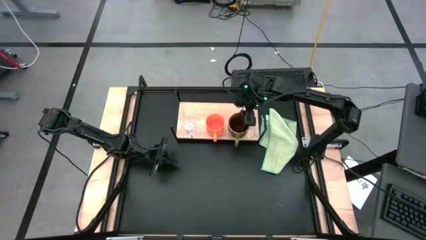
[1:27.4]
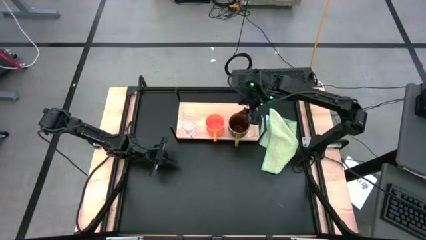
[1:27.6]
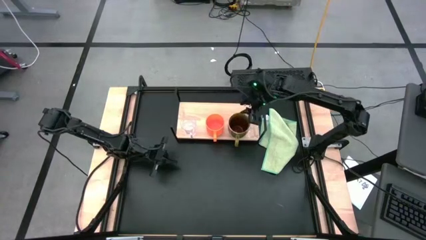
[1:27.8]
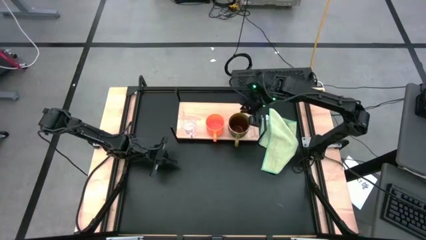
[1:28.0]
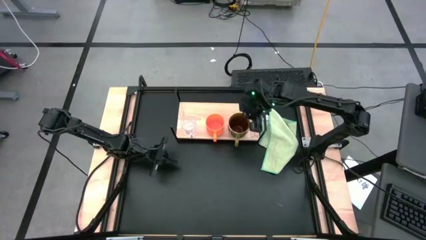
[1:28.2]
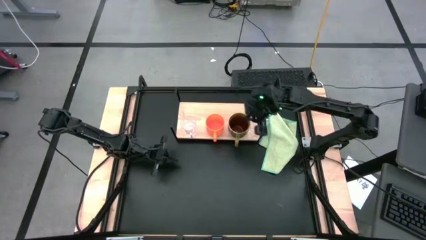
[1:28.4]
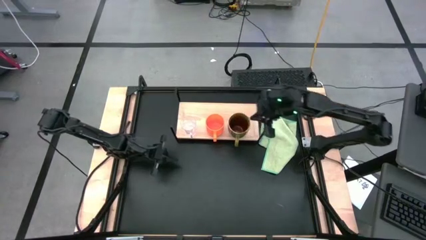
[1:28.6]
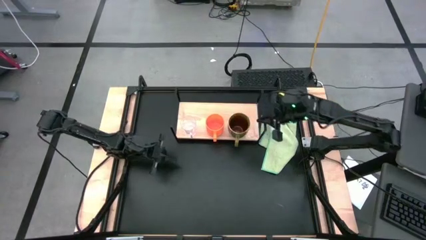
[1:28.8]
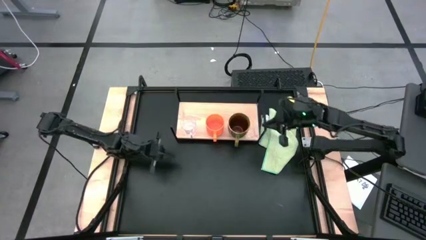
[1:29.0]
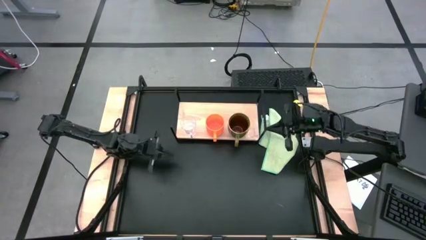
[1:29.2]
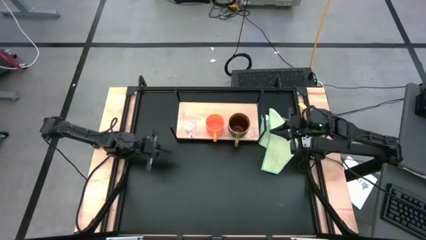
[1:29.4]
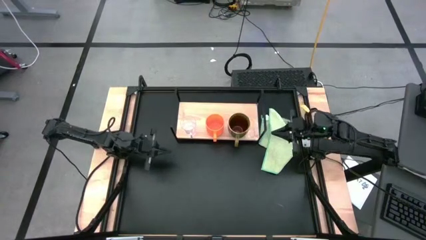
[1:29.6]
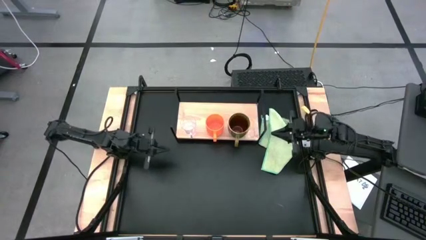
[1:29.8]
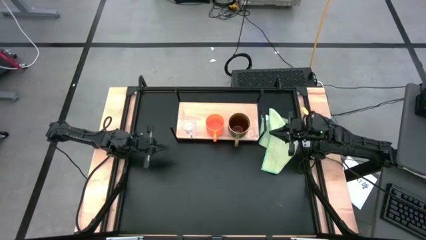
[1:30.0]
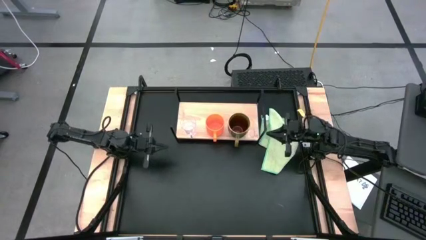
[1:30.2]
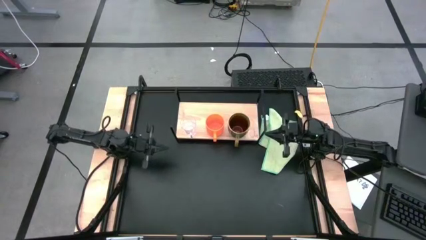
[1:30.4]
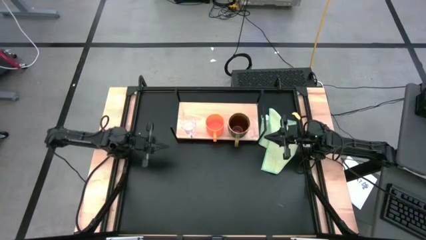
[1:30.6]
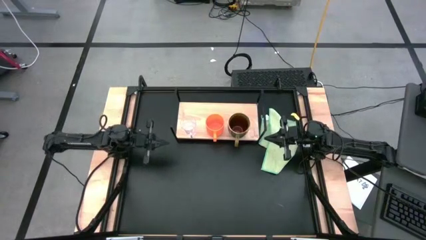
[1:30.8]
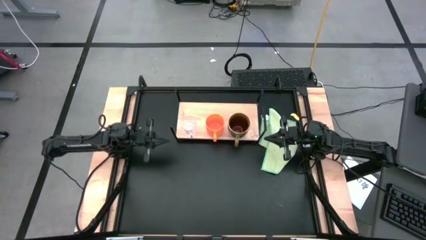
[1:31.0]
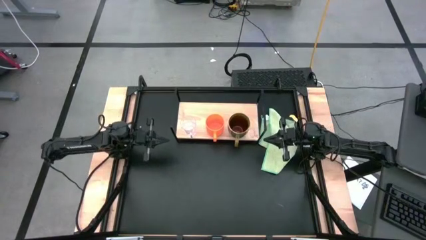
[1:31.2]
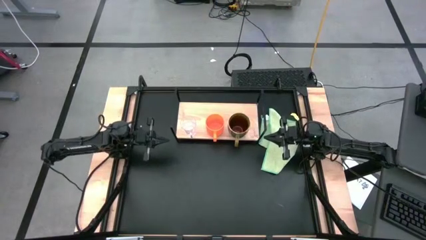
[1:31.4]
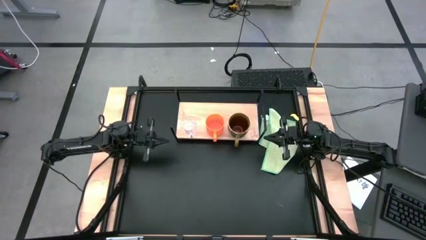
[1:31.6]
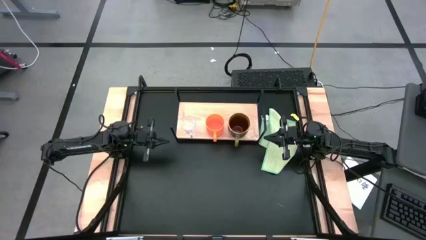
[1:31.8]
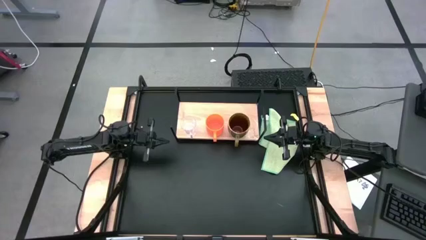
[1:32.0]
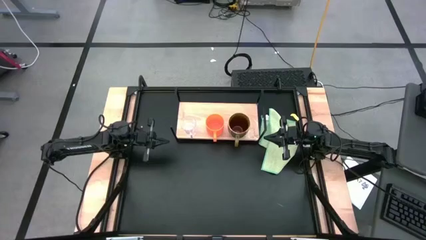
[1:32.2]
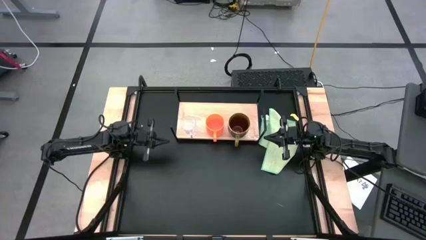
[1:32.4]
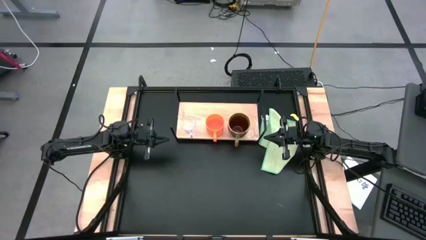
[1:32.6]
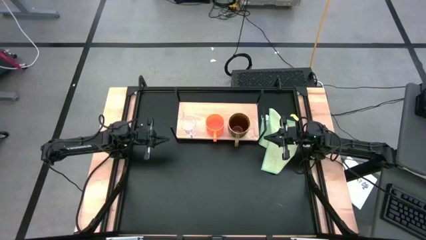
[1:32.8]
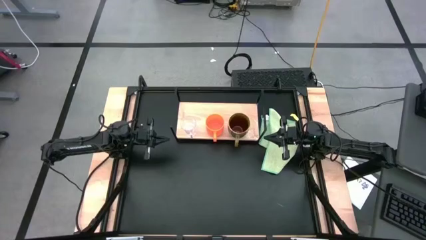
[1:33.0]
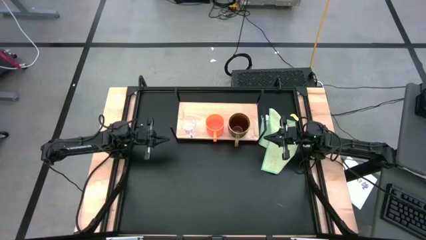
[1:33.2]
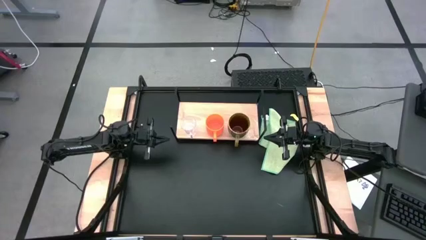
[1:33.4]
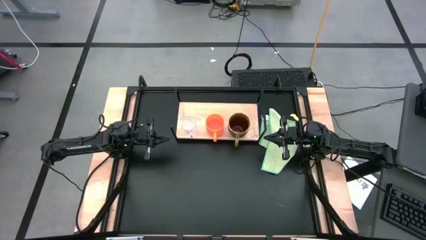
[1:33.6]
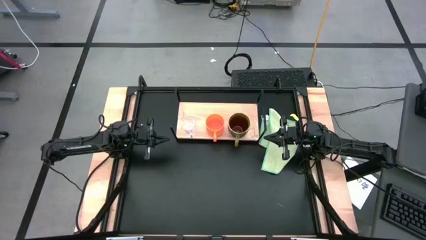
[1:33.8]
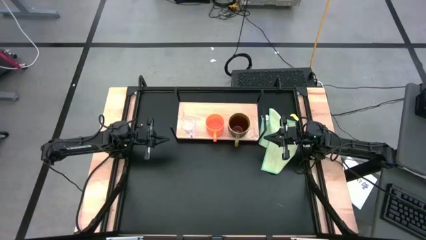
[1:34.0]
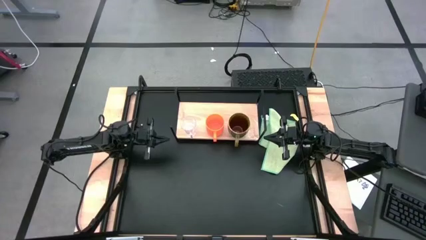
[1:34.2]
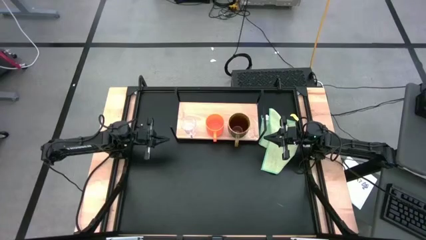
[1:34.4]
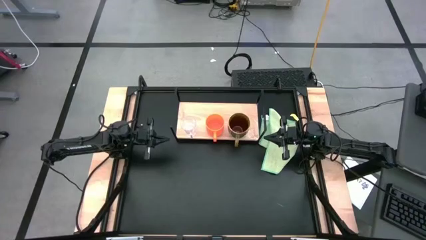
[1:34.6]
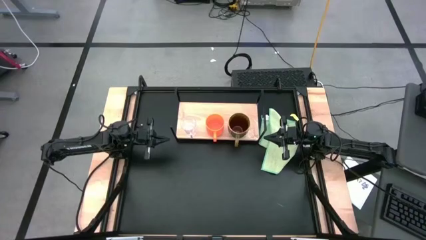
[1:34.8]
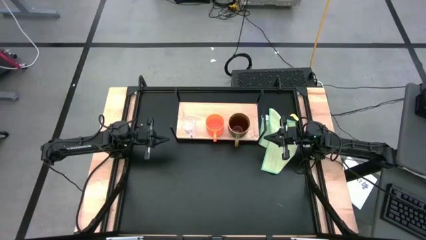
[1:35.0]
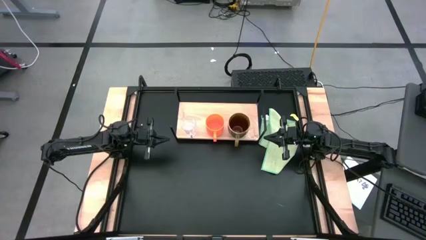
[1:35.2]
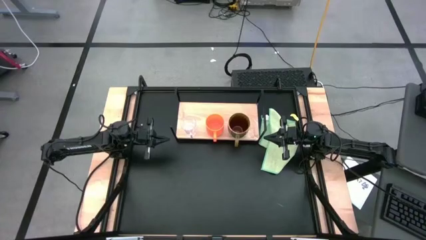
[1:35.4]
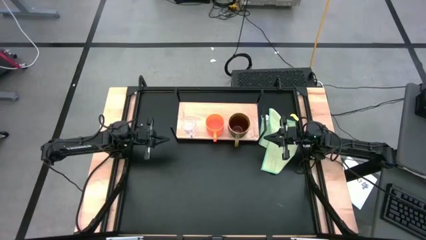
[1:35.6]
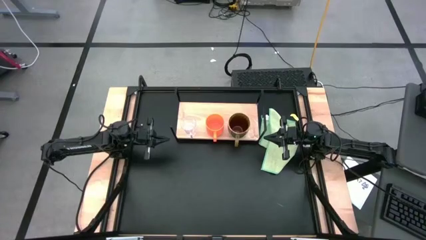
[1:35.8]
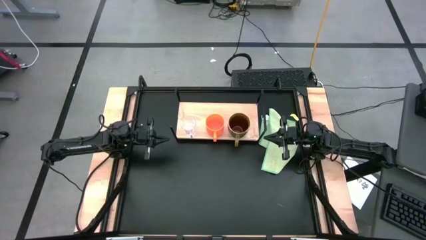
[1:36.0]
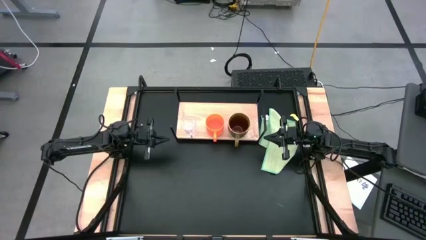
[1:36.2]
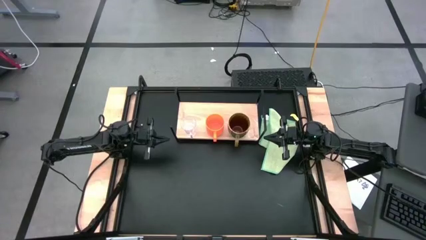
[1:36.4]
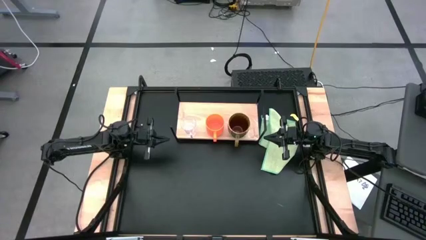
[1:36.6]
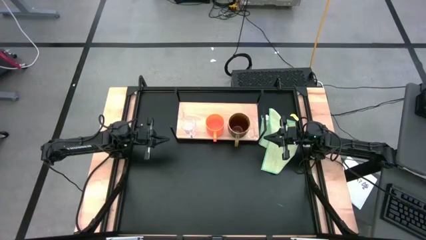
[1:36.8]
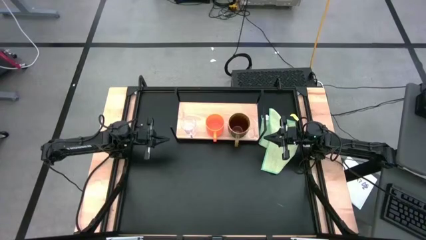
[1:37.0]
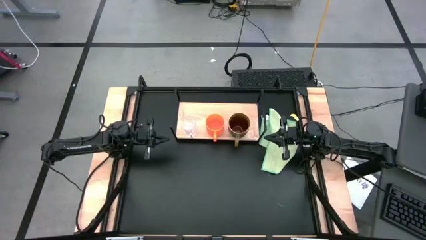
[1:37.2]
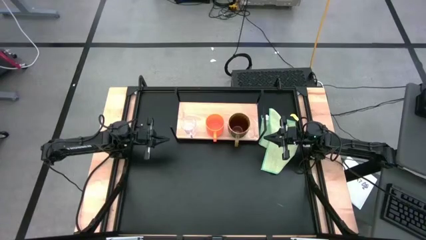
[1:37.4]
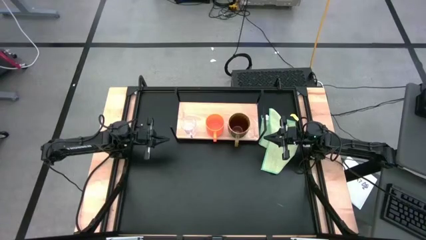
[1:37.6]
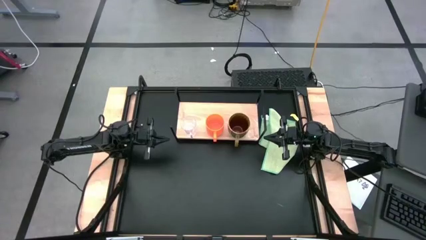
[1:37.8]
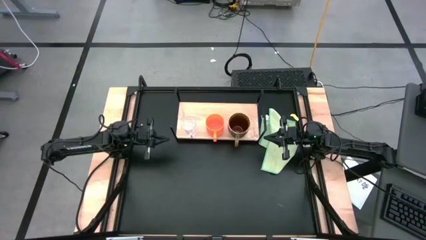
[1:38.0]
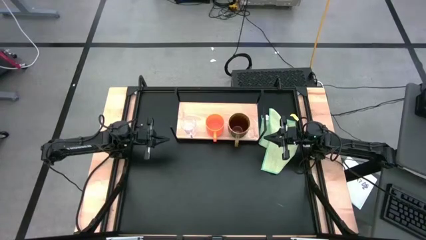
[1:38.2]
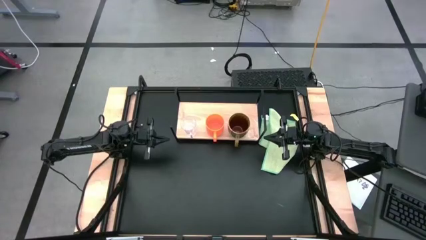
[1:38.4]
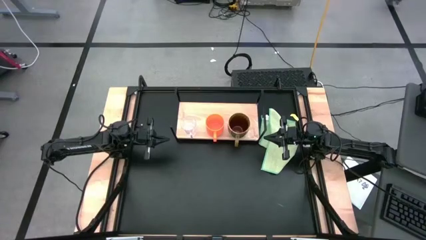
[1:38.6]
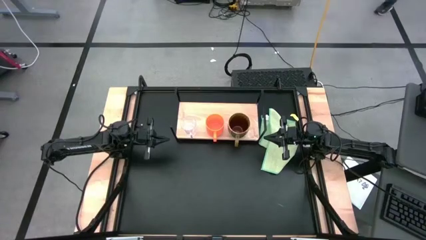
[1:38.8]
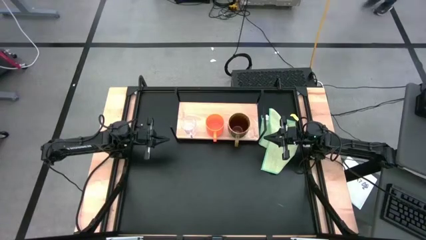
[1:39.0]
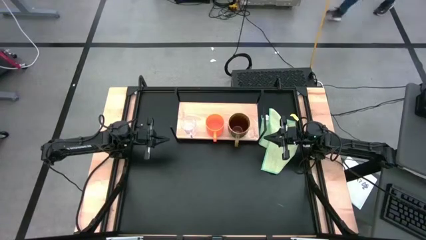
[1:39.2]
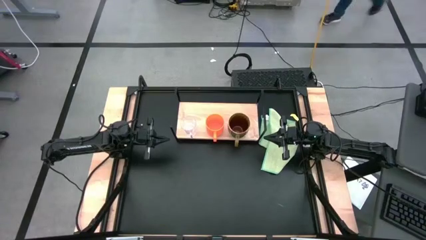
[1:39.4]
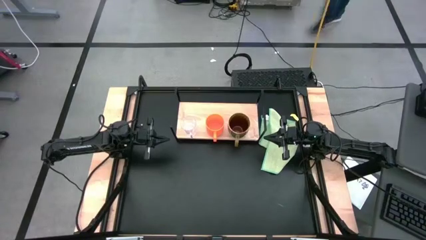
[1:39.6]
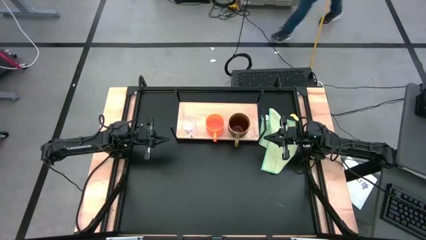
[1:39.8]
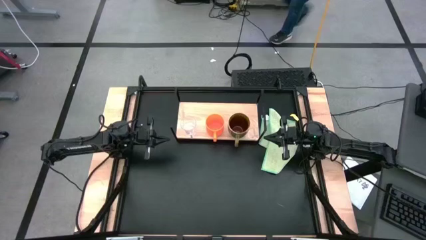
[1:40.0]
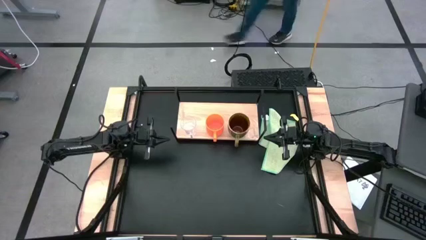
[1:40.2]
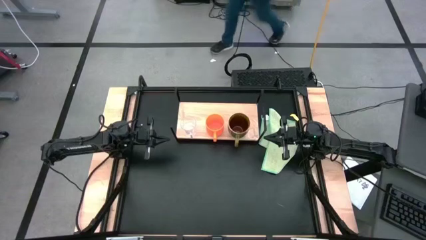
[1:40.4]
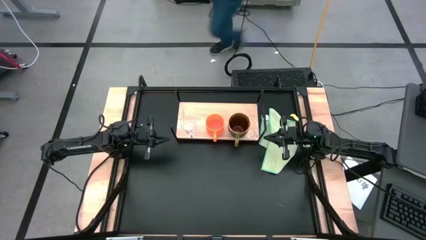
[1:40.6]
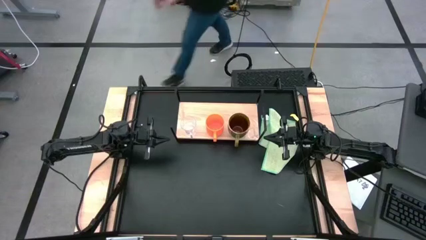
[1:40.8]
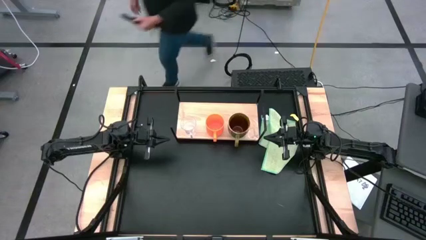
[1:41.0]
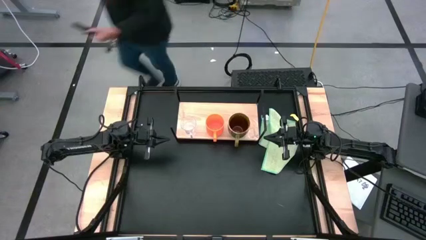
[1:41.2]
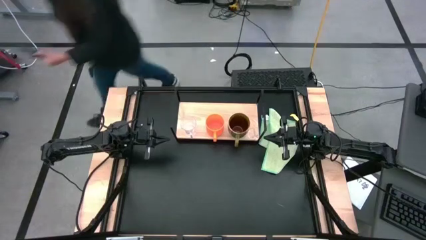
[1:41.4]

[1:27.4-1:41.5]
Task: Stack small to large cups/mugs on shelf
Return to Home Position
